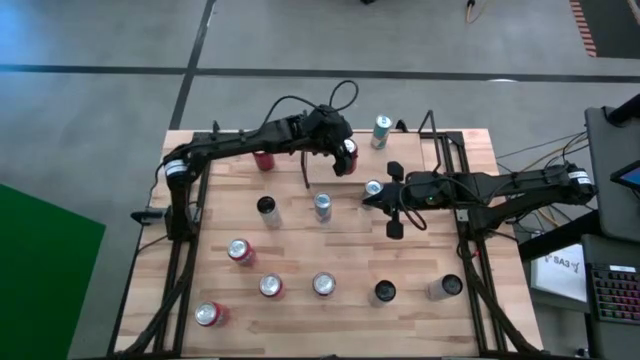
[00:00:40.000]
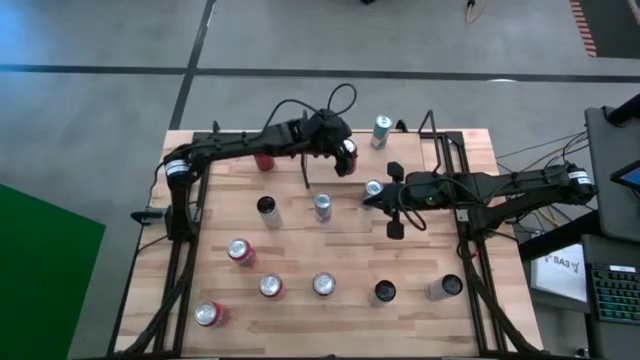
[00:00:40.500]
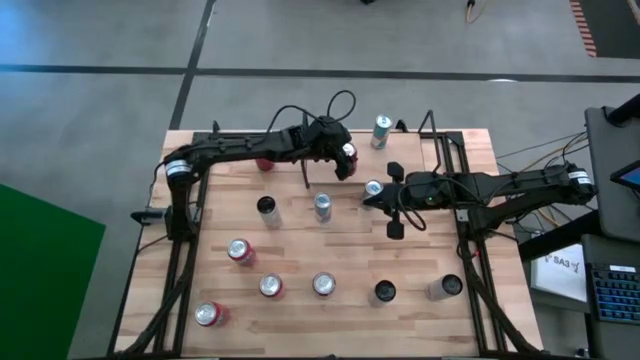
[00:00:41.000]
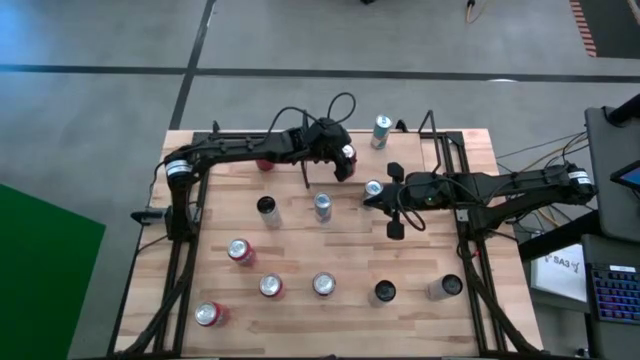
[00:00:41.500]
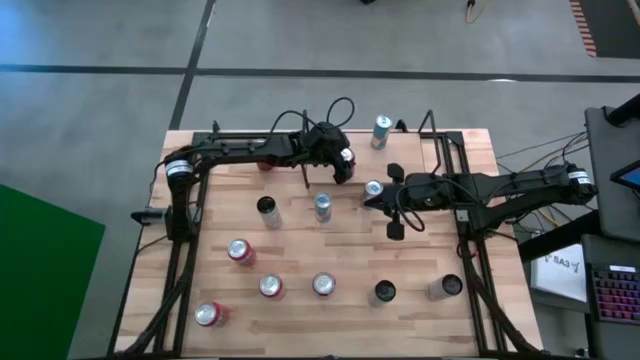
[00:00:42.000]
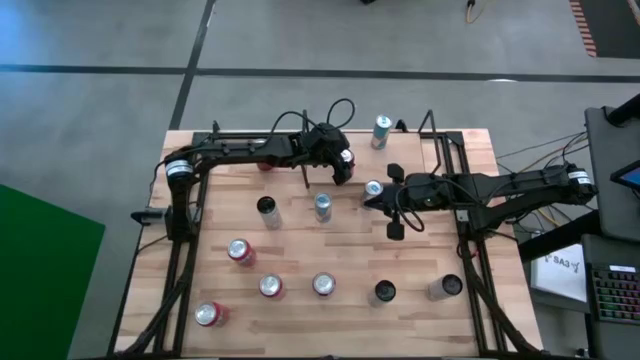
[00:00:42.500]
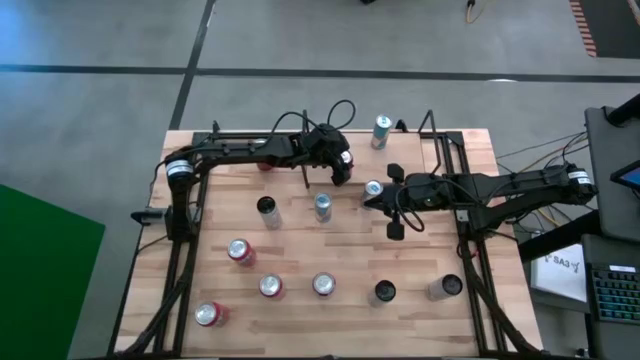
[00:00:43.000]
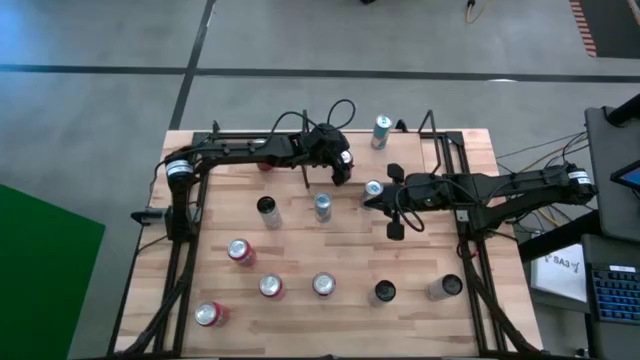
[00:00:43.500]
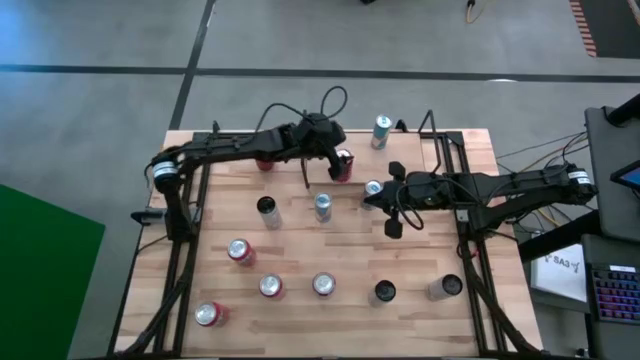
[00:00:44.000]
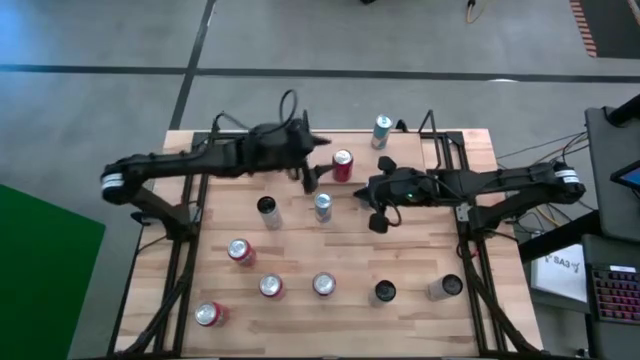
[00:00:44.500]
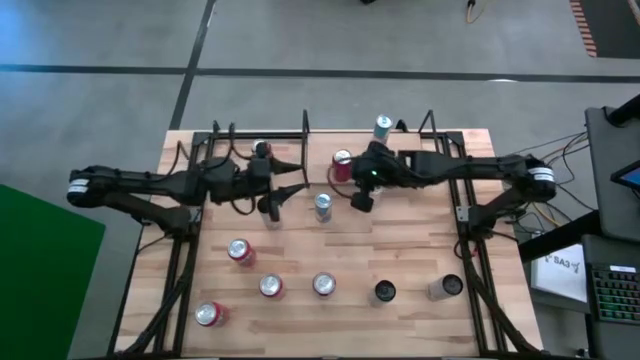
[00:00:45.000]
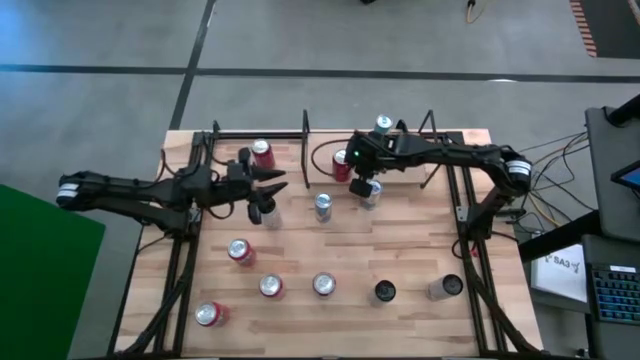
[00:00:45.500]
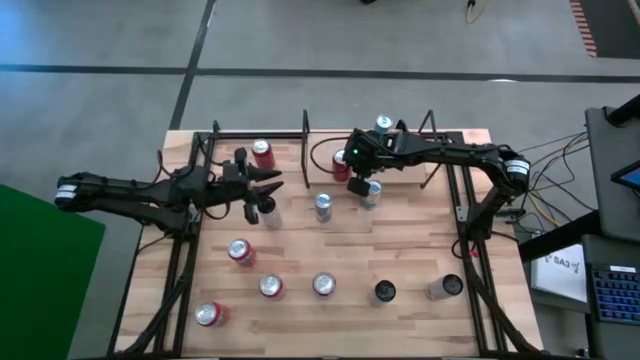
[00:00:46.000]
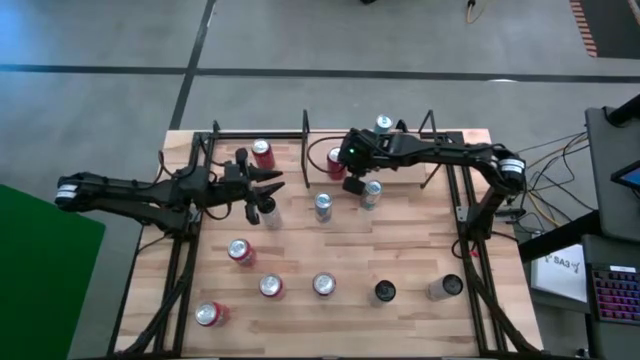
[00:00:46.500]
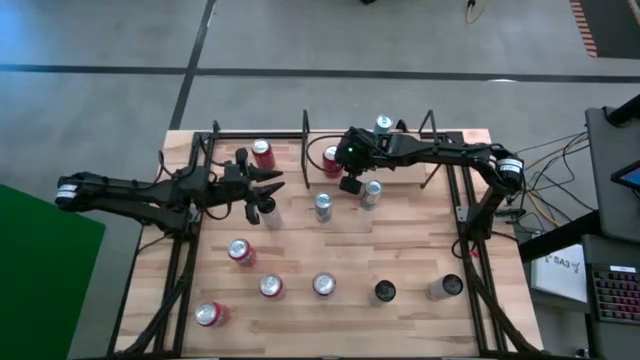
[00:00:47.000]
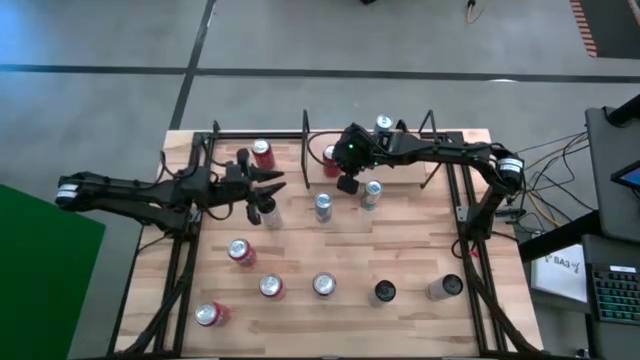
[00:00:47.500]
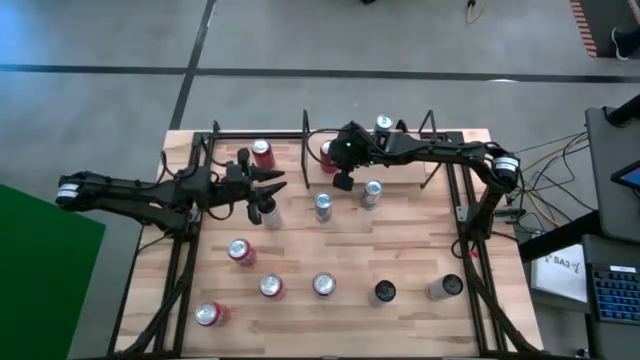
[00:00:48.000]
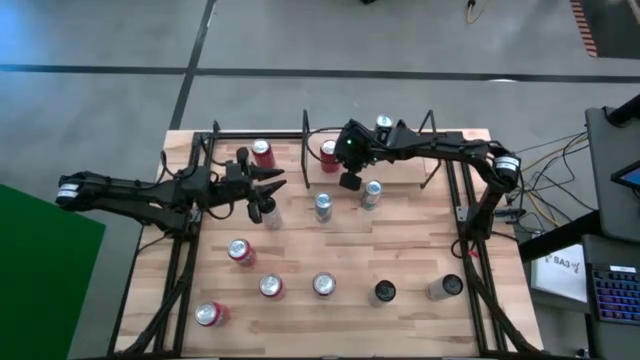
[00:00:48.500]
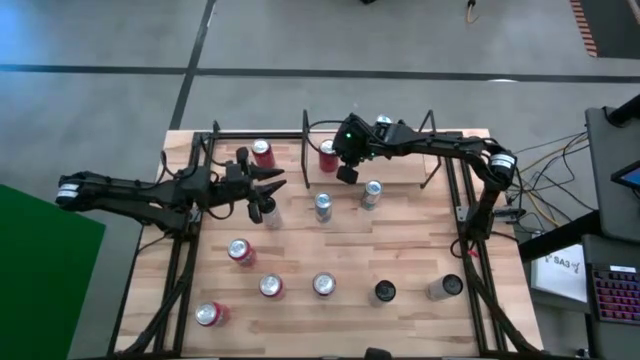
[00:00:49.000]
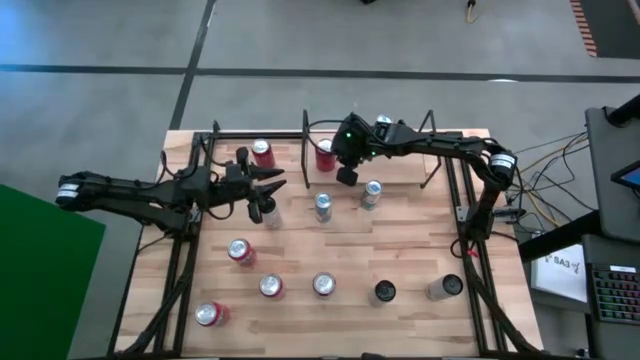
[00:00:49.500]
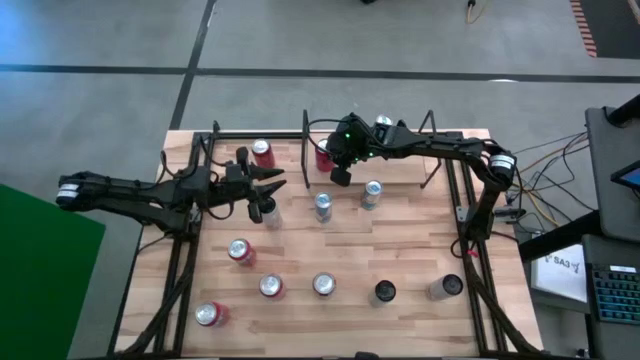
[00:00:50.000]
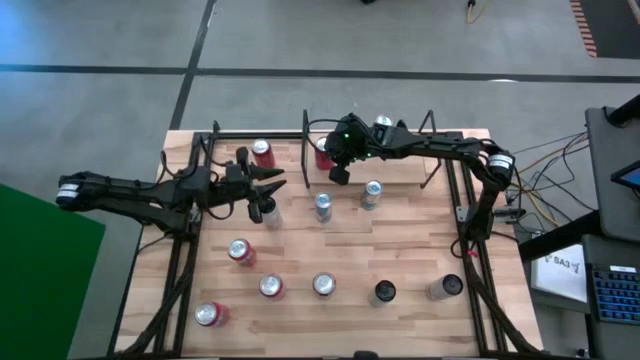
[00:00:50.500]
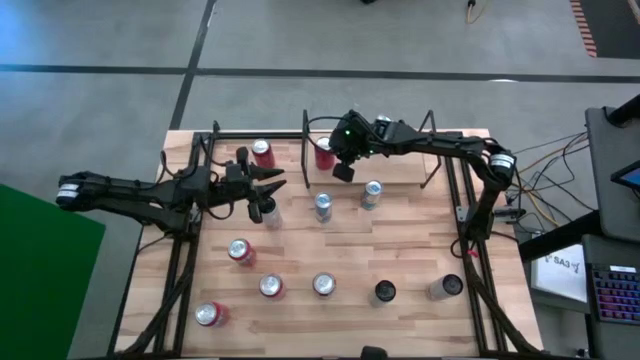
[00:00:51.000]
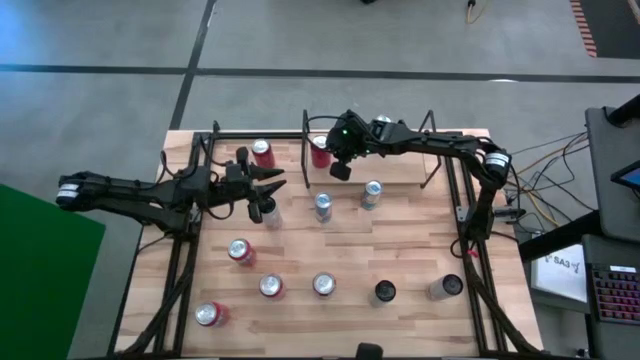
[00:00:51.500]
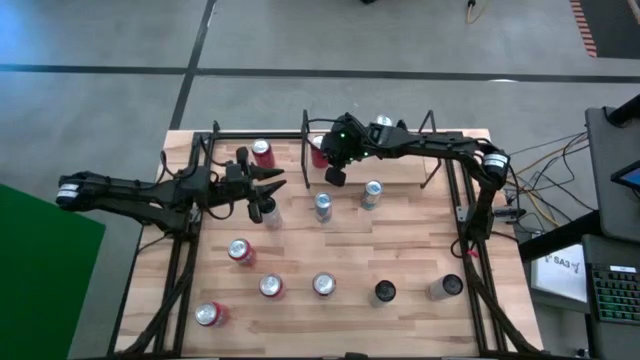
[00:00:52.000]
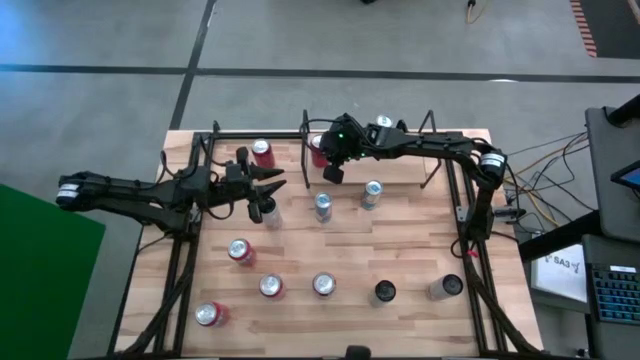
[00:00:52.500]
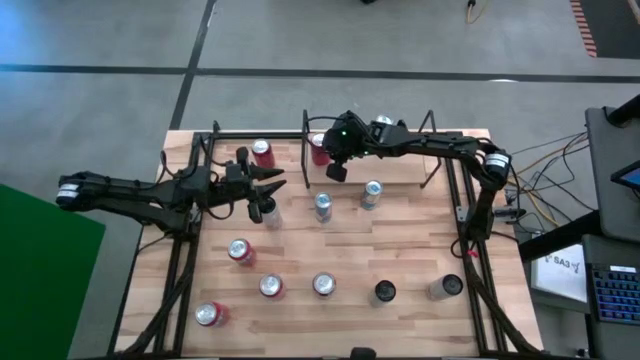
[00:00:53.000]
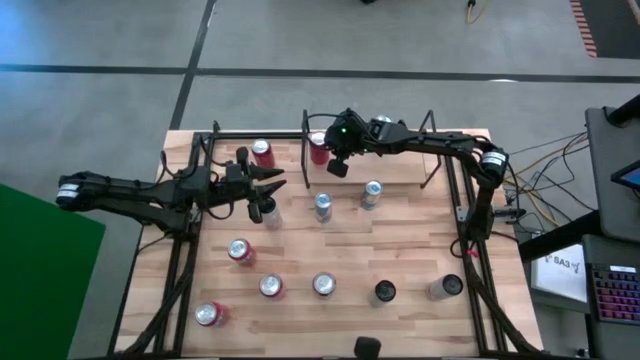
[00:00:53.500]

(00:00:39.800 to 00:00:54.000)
Task: Place canned beverage on shelf
Put the red and black soda can on the shelf

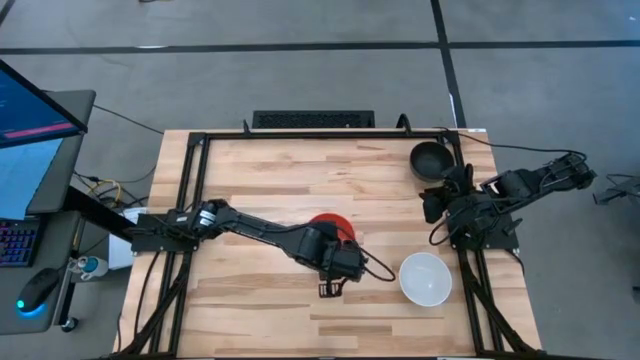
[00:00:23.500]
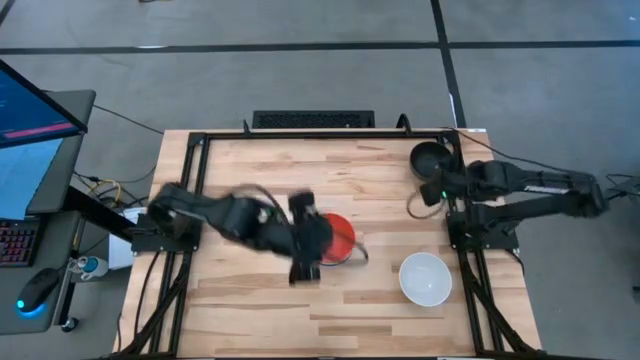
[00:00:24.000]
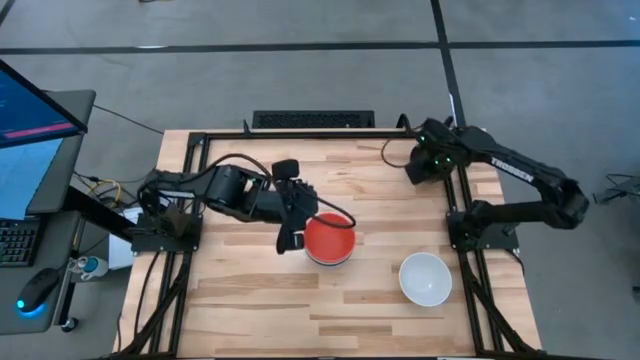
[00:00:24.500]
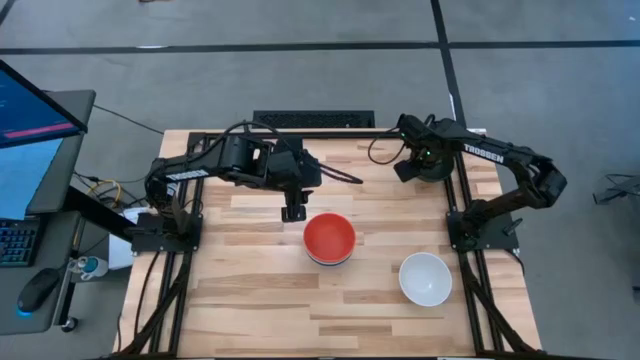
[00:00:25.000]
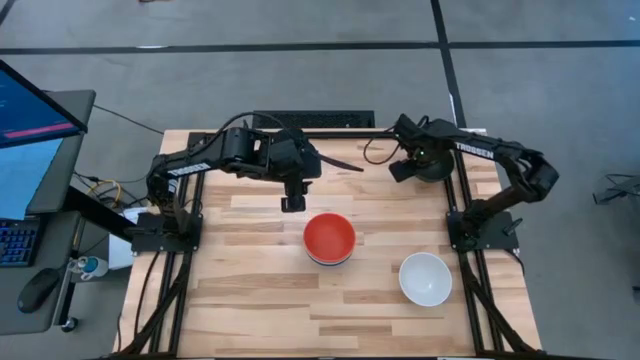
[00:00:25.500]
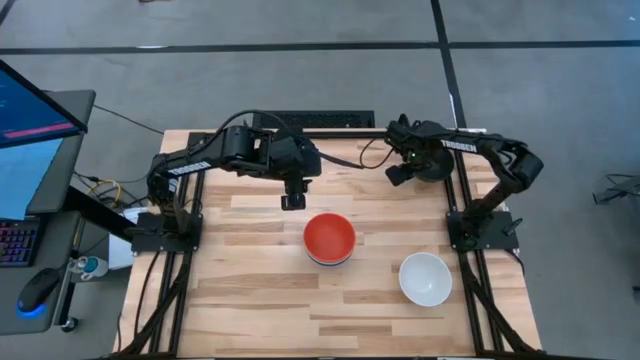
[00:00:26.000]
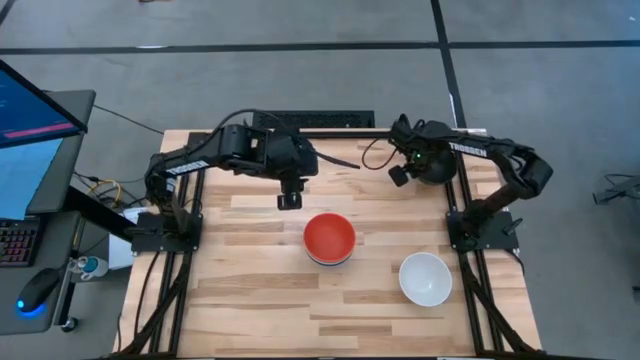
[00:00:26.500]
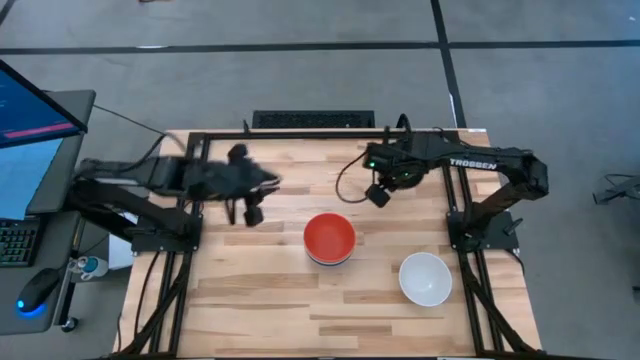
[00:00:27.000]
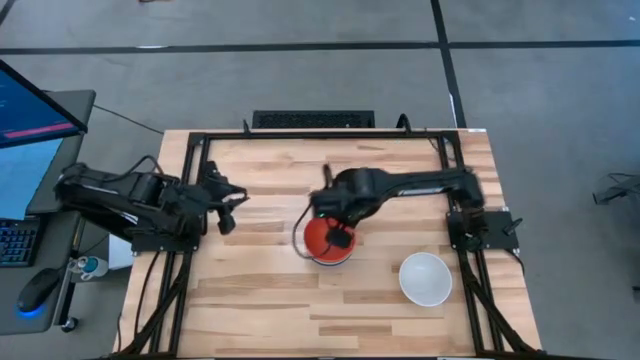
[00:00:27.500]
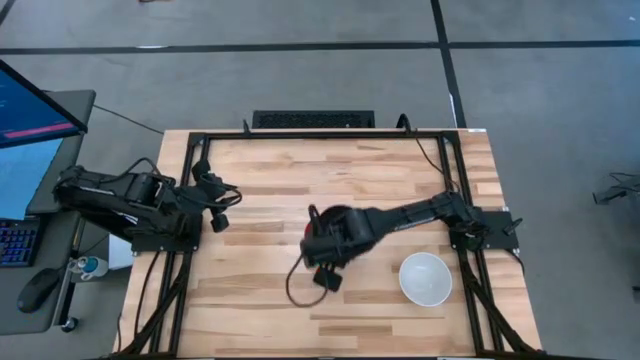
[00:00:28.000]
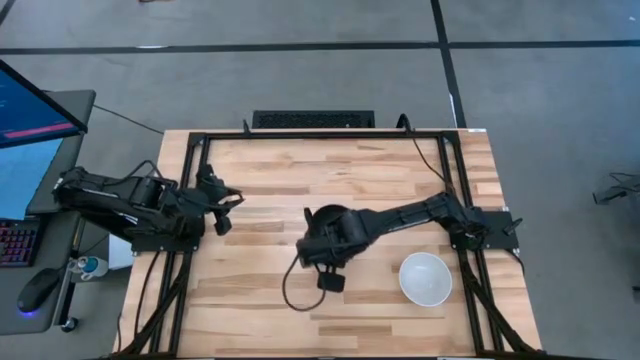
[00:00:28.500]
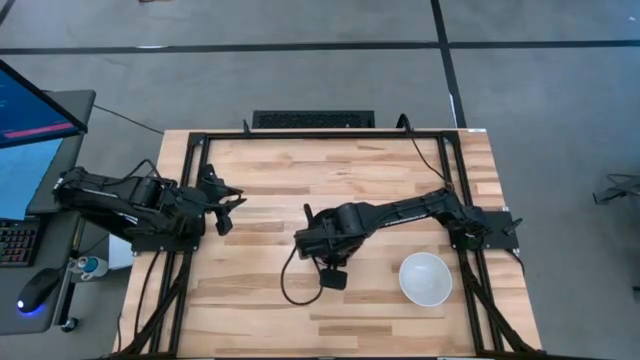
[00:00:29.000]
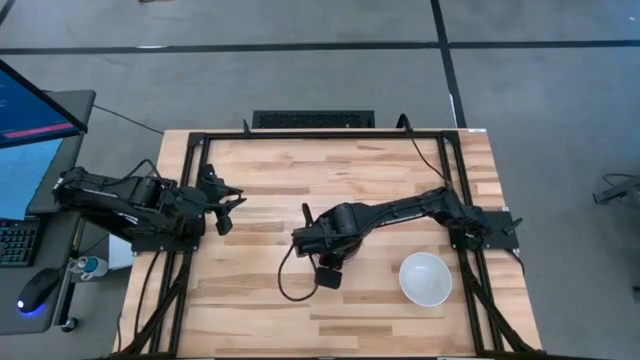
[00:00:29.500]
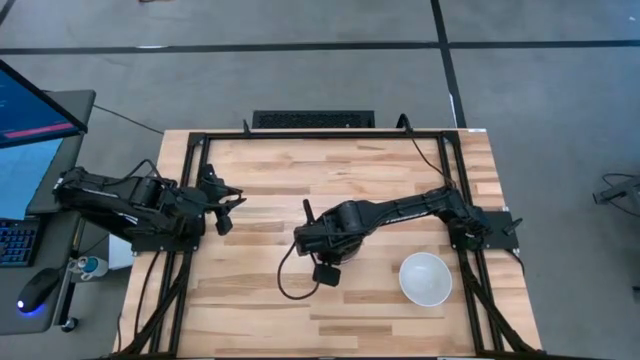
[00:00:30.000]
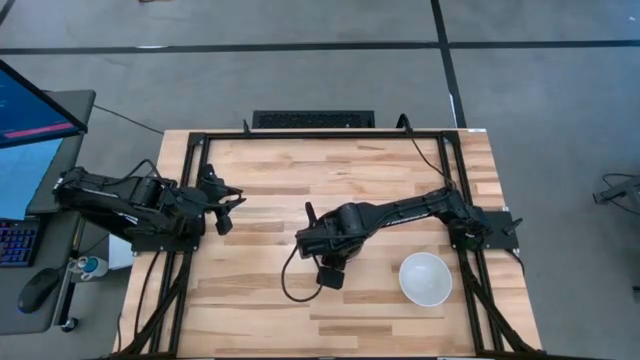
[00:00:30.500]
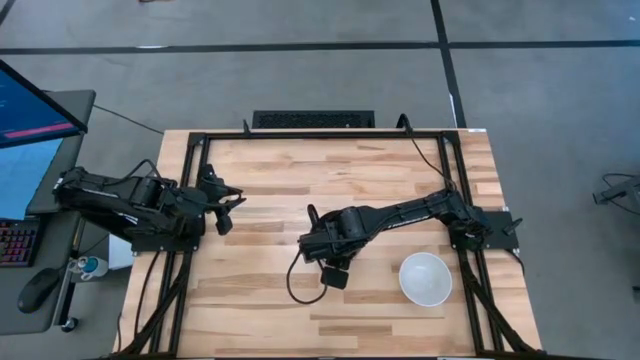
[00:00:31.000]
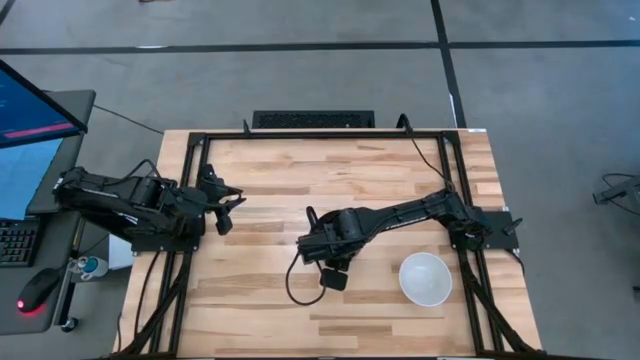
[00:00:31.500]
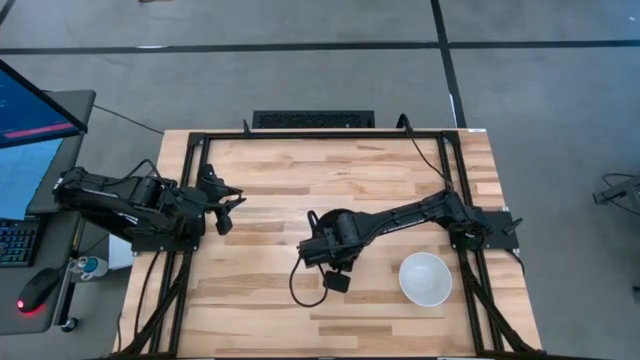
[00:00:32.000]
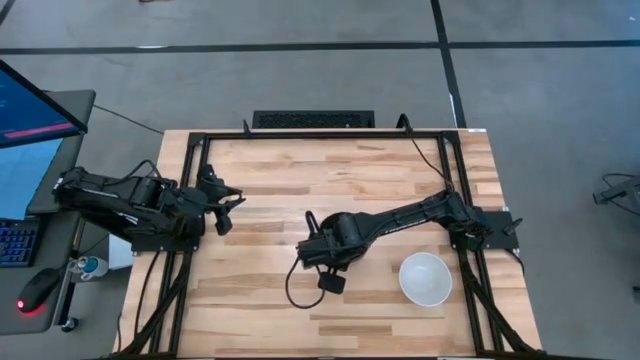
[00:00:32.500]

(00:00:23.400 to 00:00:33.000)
Task: Nest bowls inside each other
Stack the black bowl on top of the orange bowl
